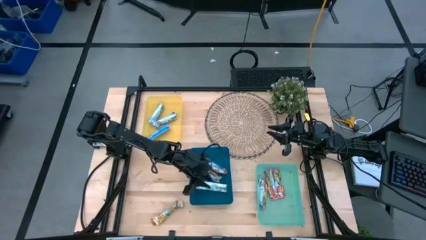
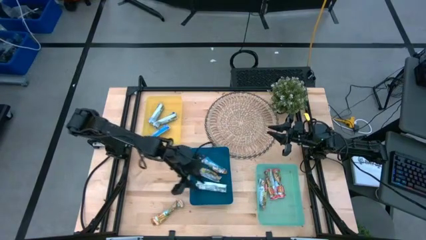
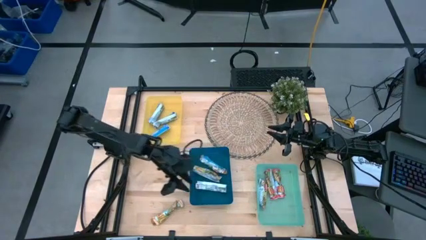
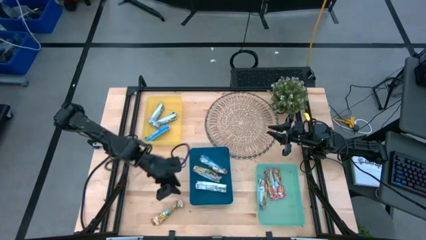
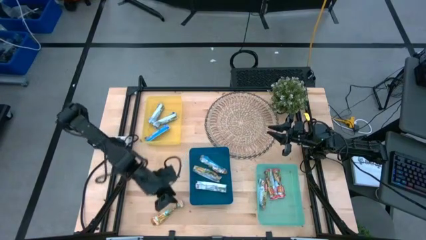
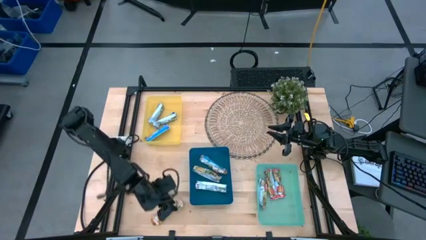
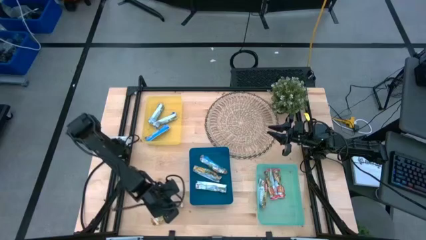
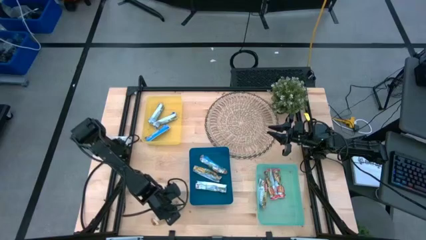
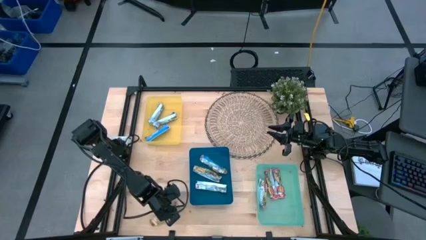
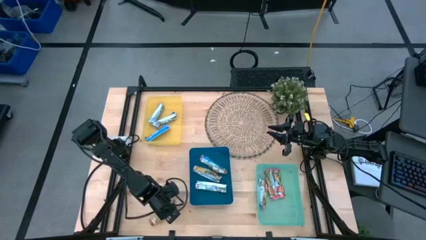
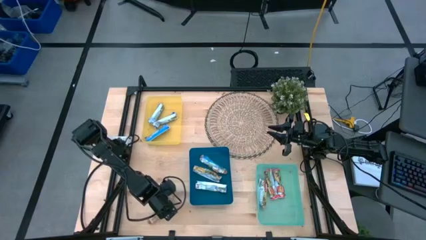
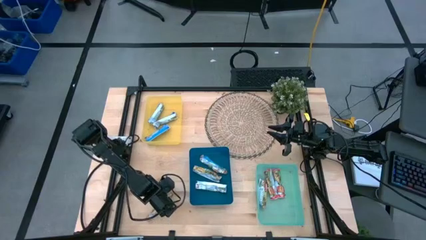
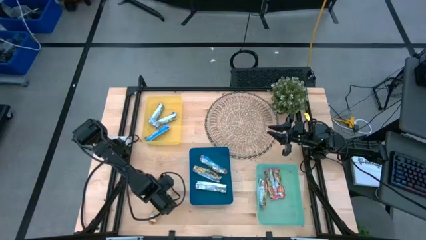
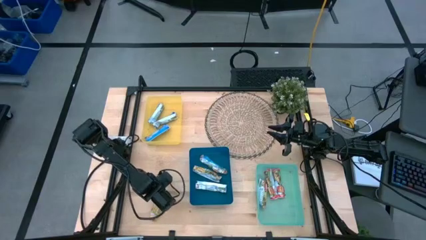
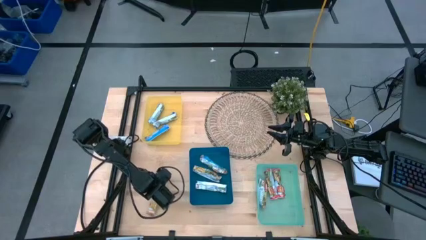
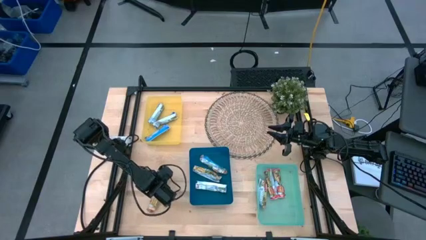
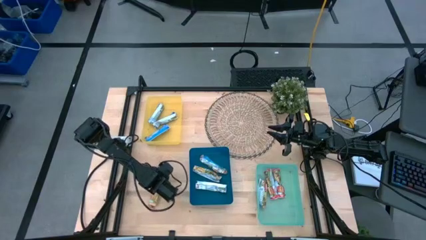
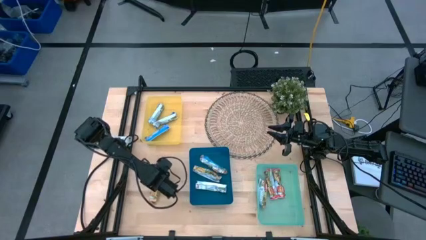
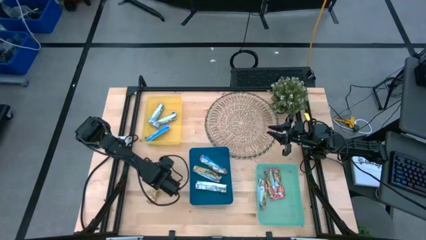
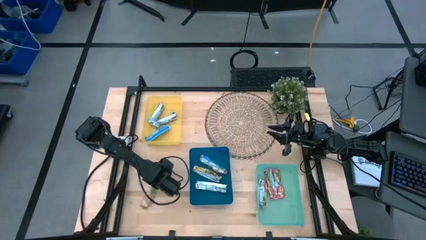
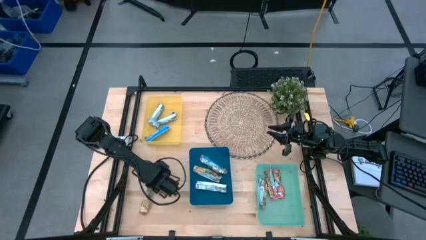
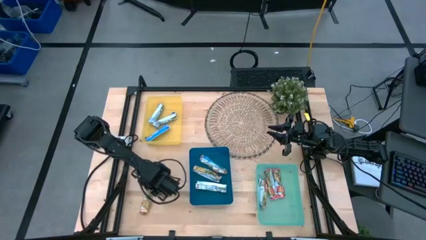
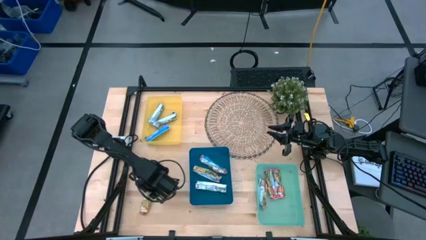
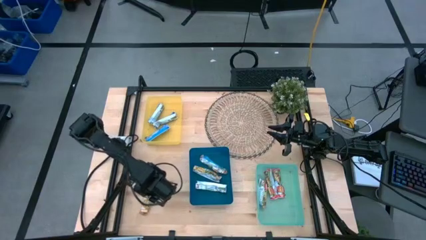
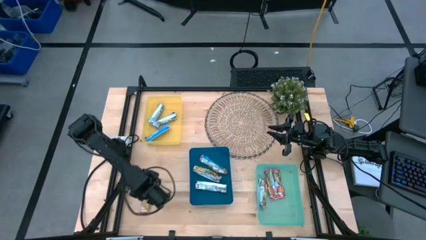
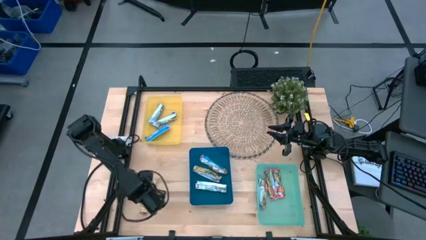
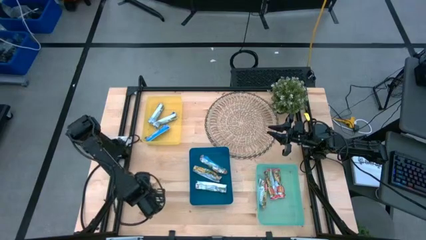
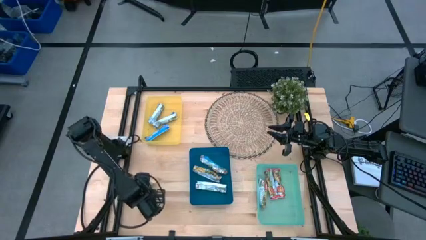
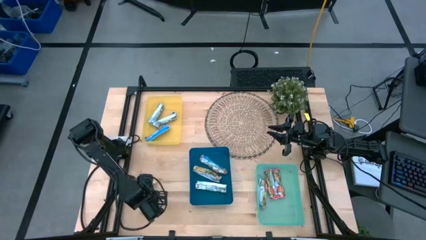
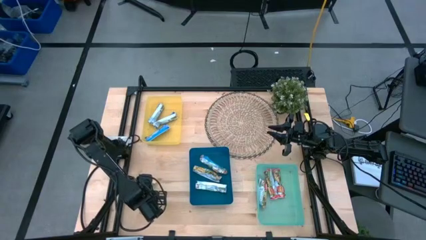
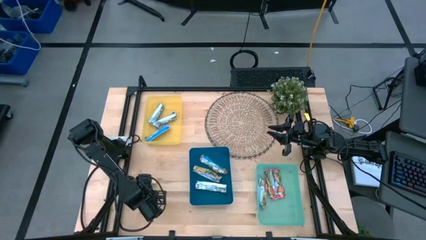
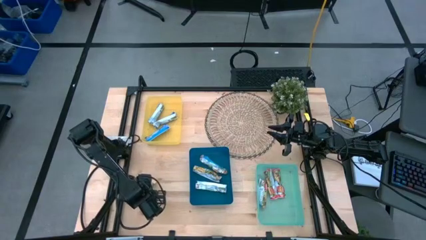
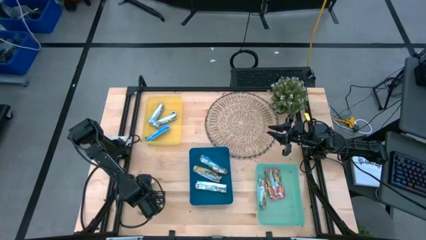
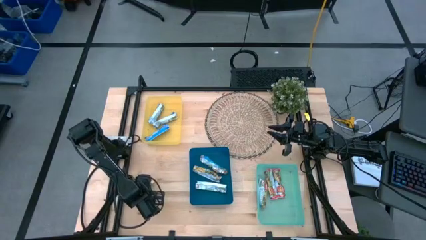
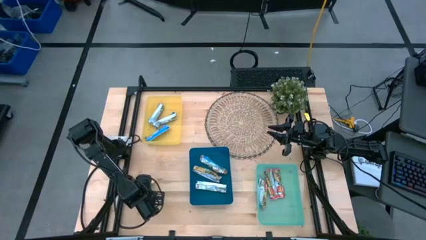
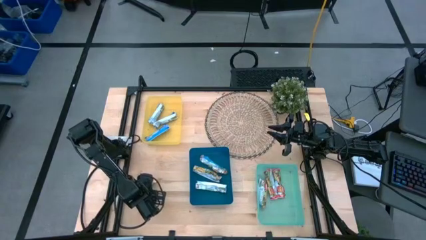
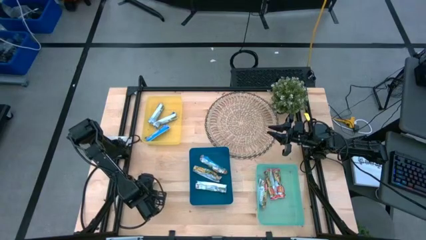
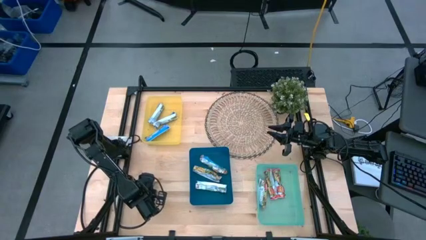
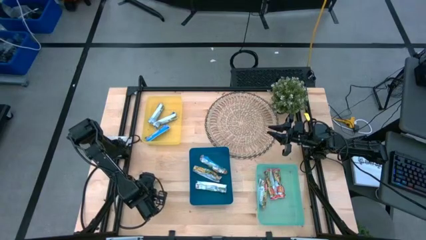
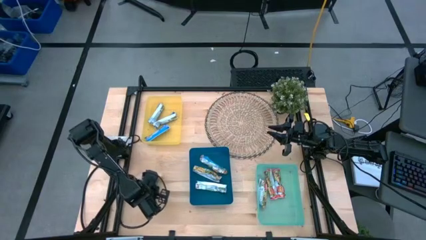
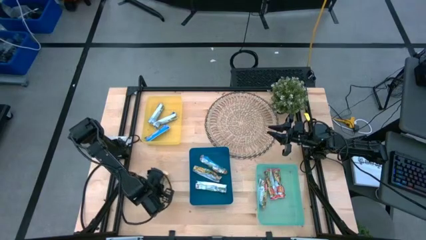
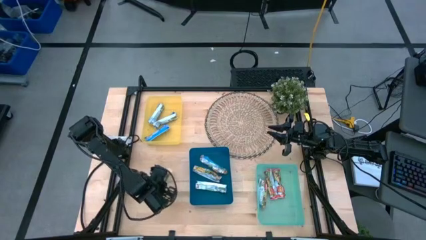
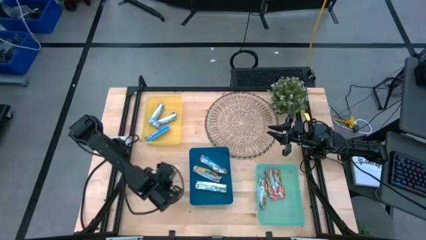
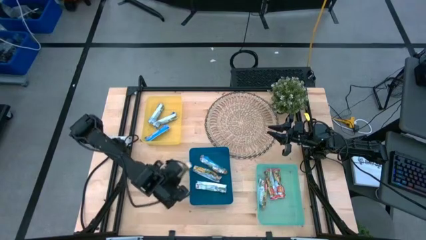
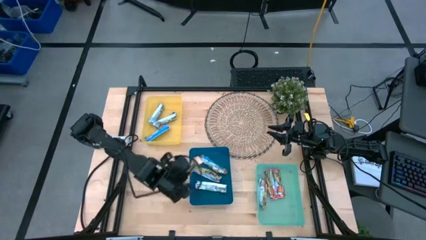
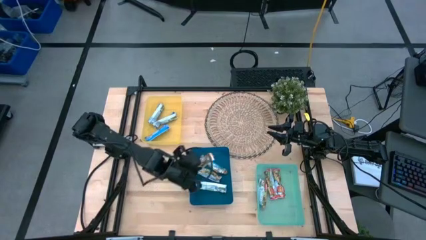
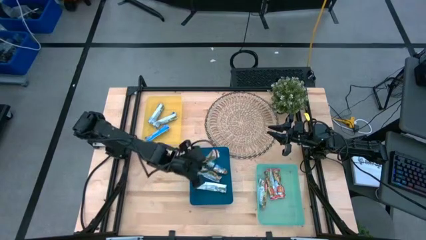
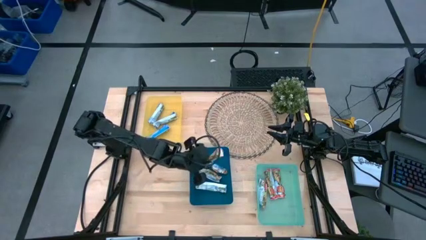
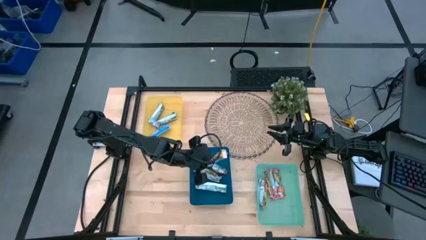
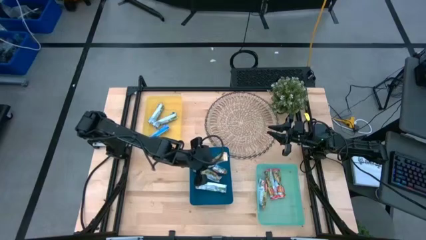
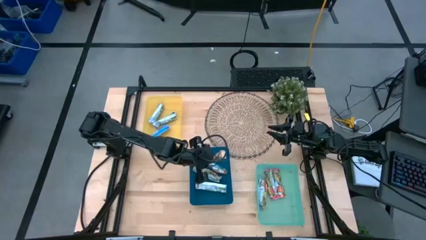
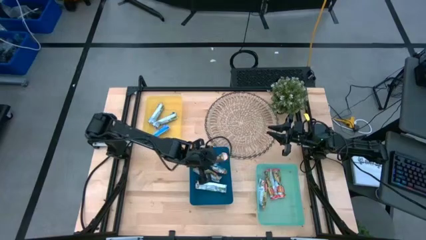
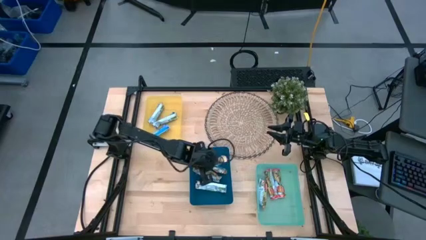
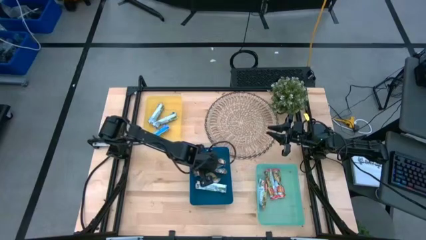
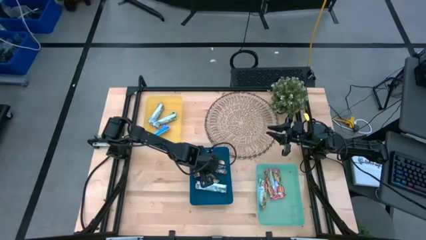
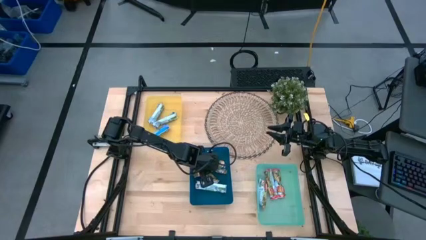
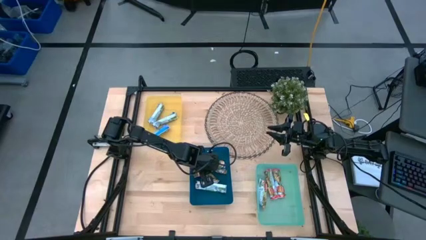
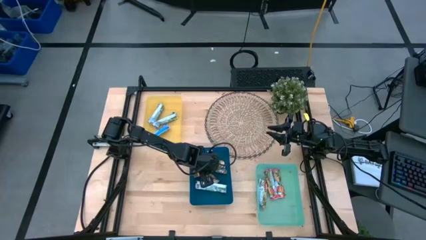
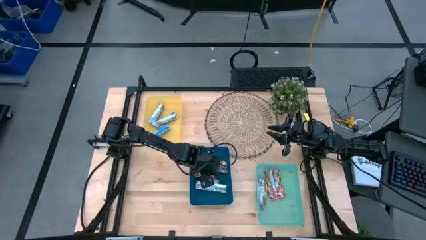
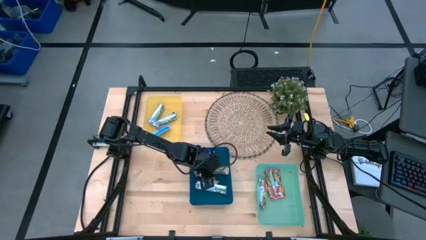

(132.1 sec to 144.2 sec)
Task: Pick and place Granola Bars by type
Put the yellow granola bar into the blue bin

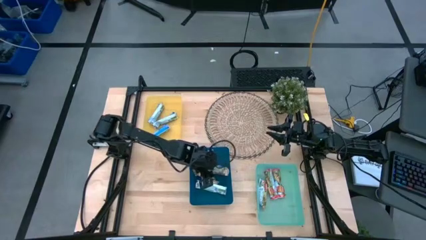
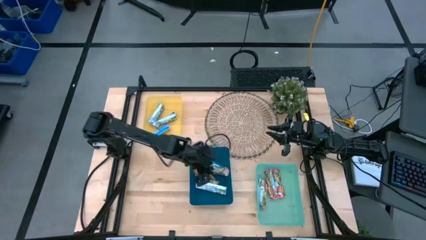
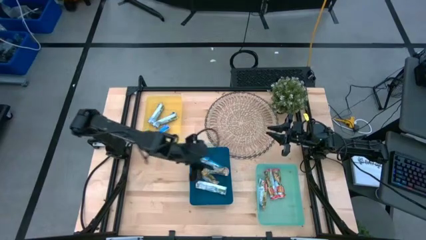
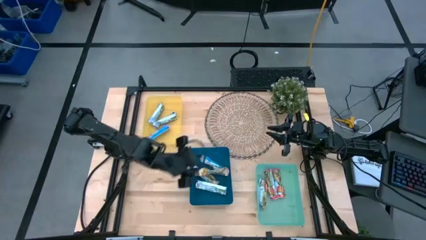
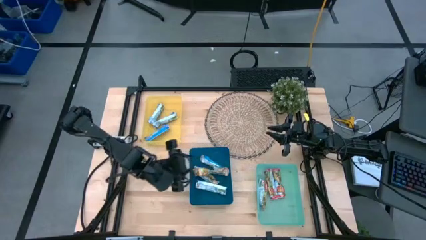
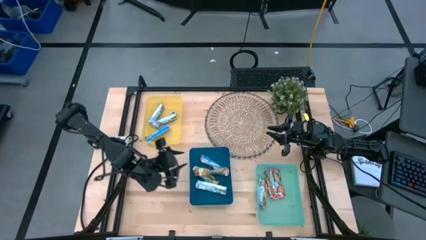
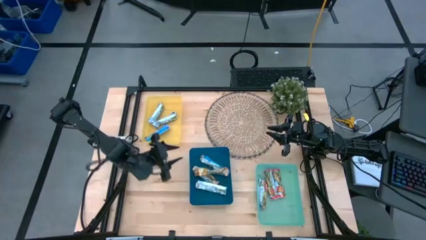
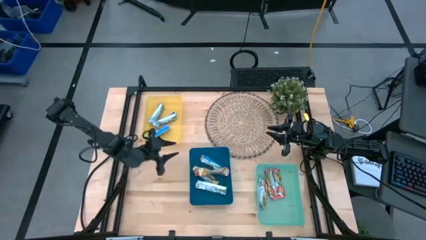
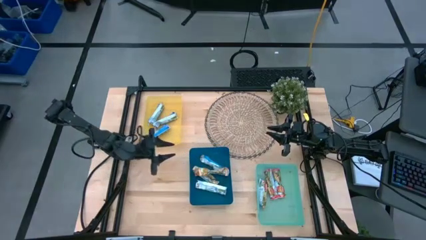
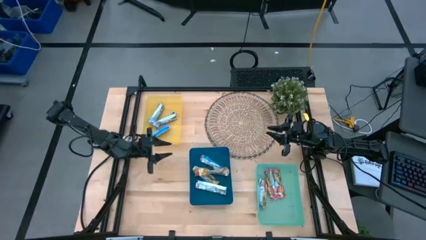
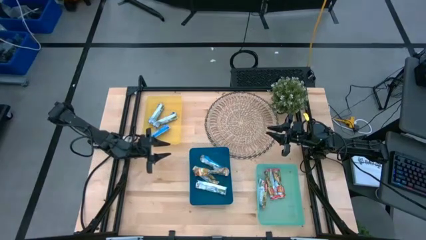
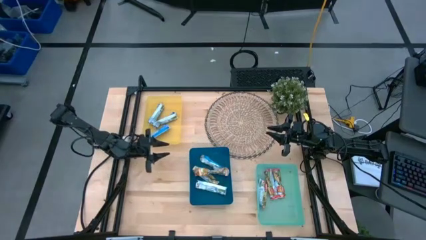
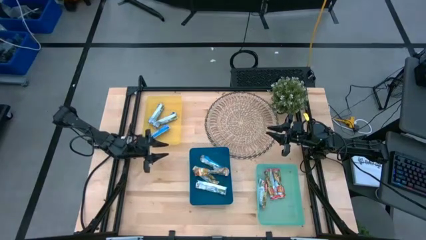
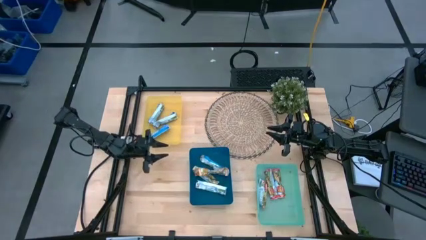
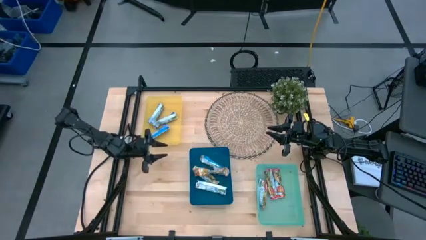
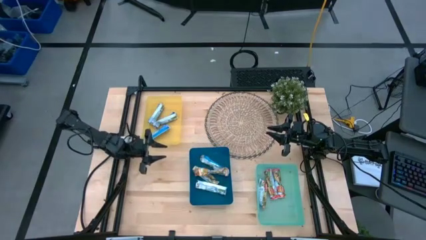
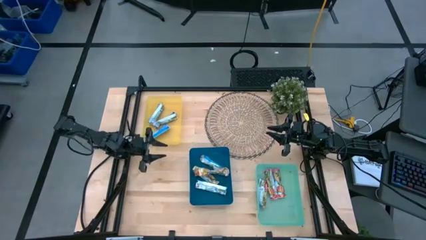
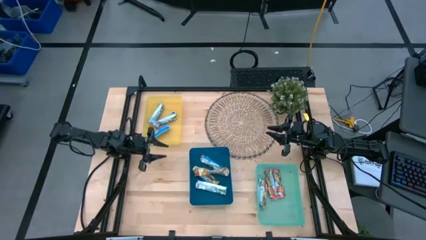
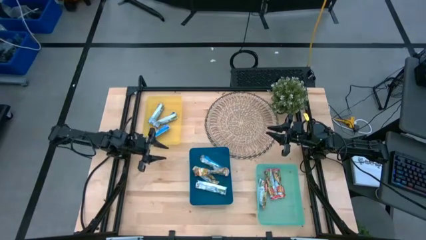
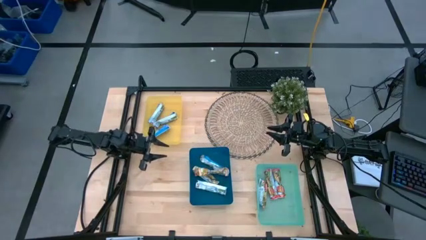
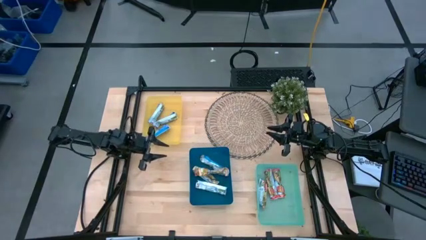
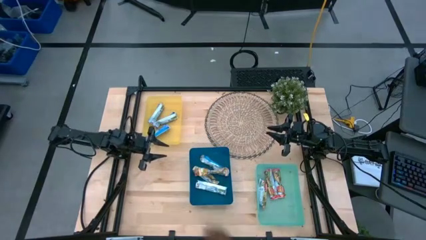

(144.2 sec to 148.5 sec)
Return to Home Position

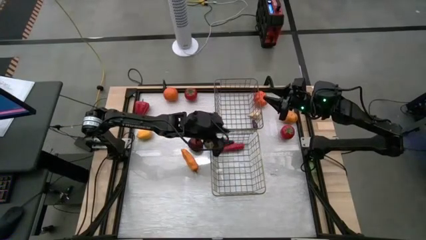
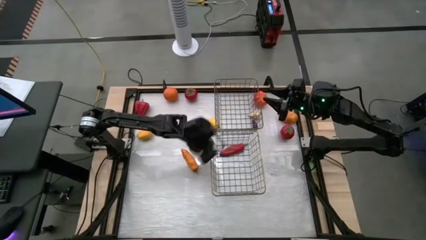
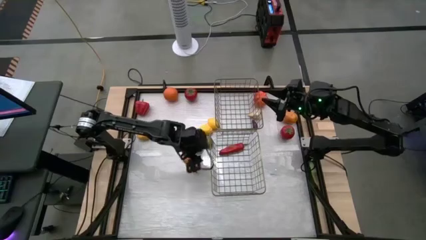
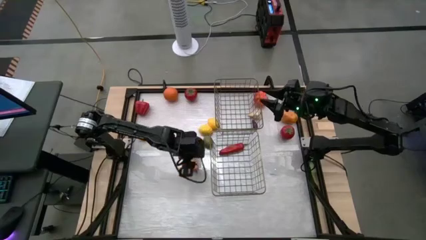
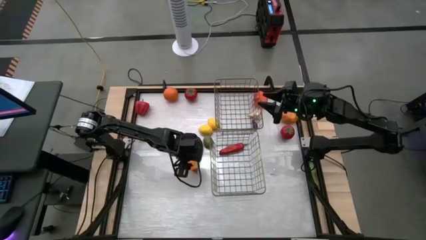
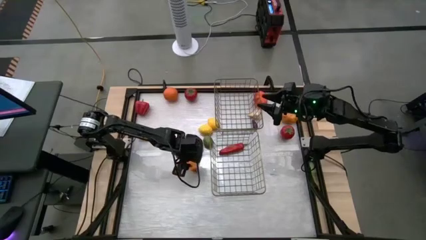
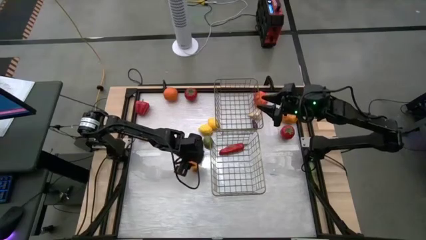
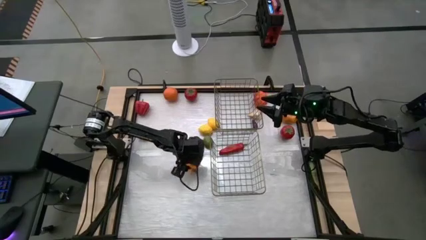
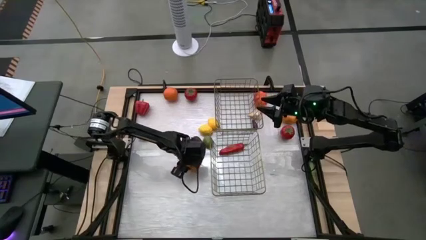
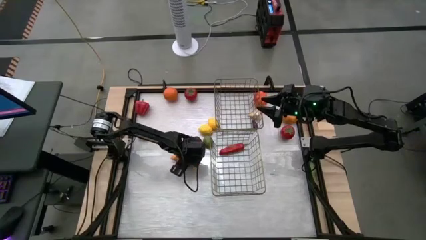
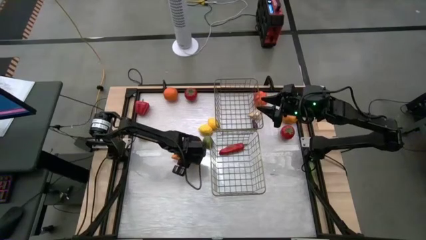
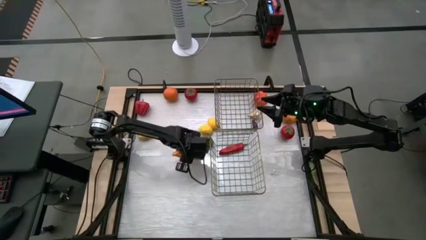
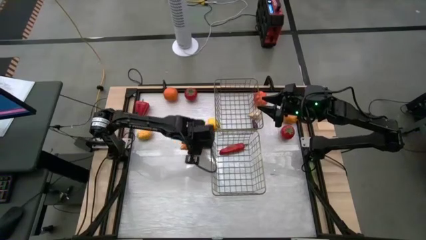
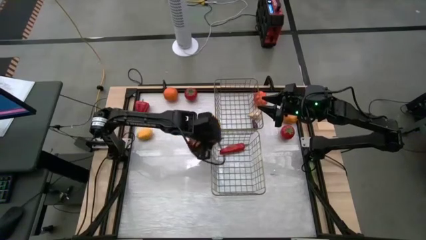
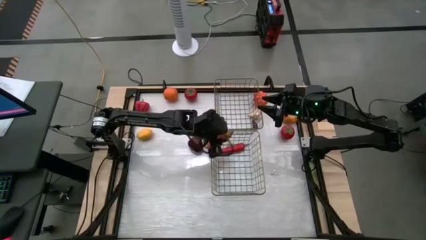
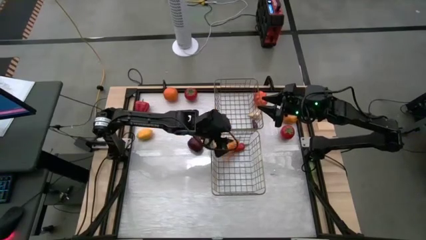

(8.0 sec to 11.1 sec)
Task: Sort produce into baskets
Put the orange chilli pepper into the bottom wire basket
